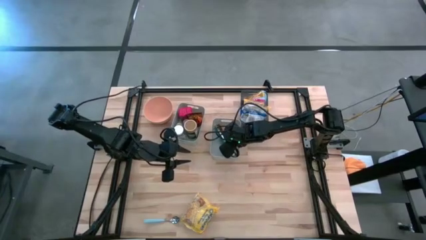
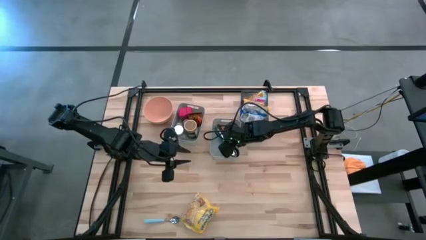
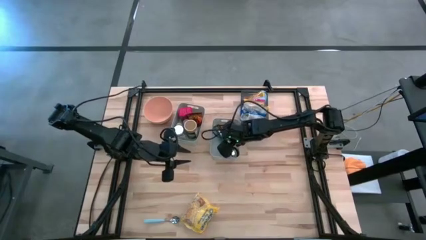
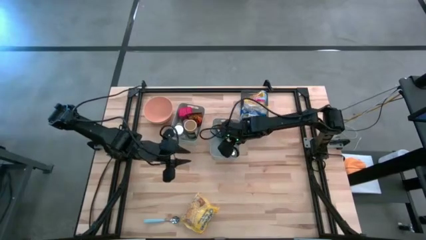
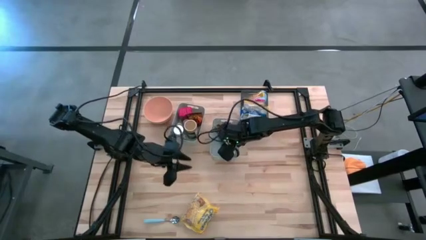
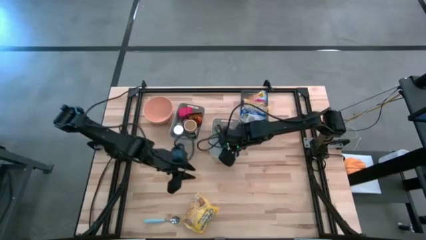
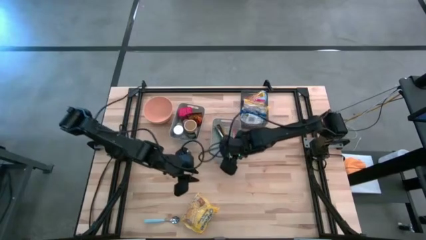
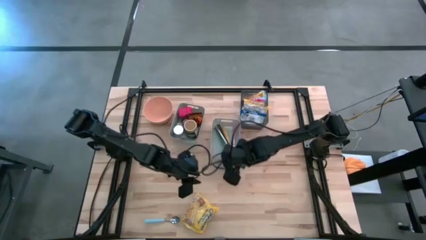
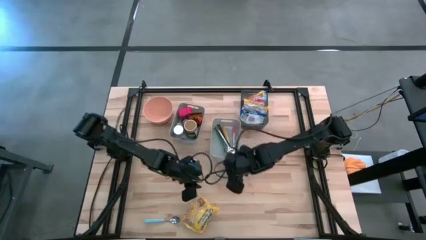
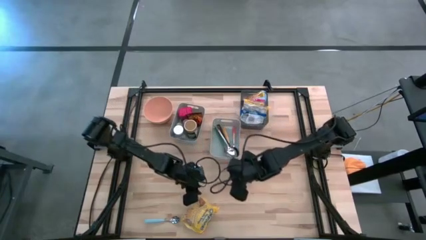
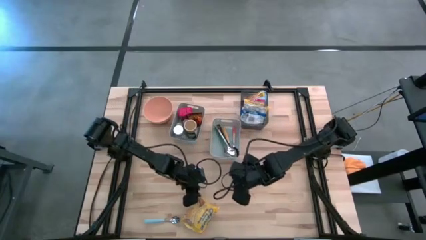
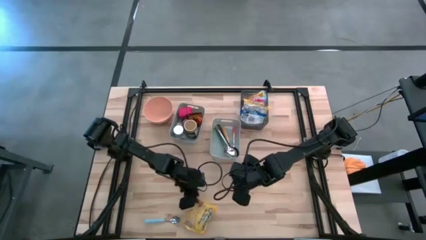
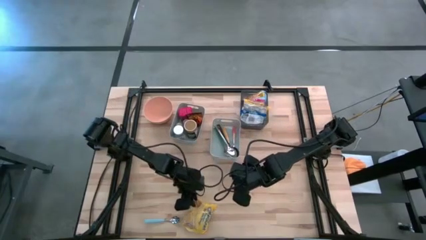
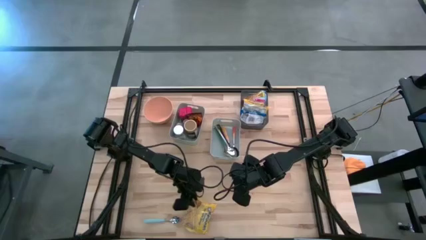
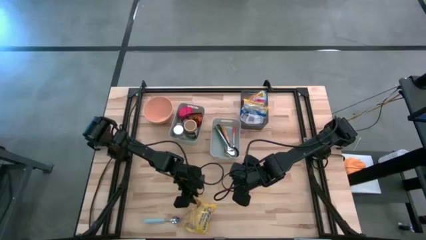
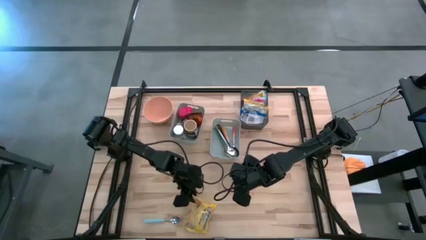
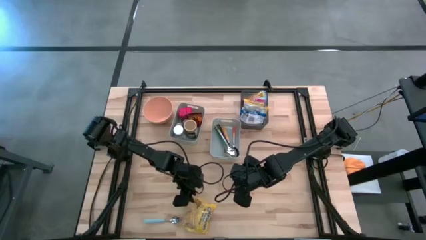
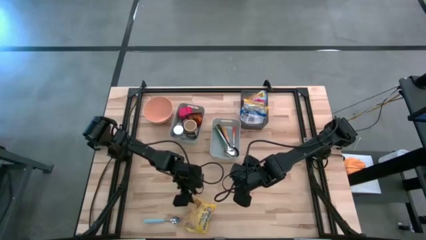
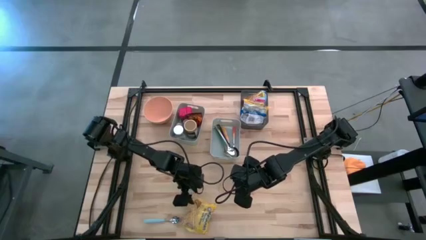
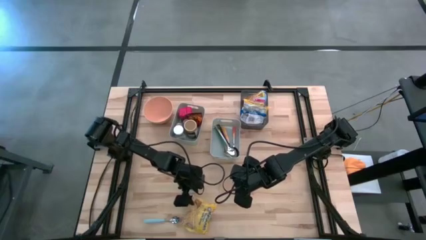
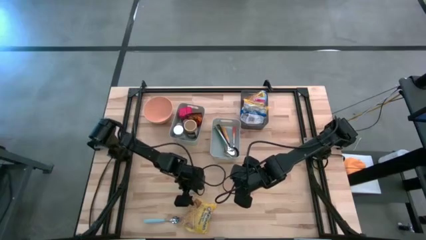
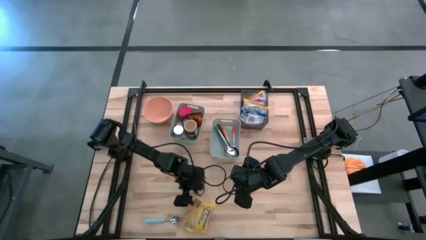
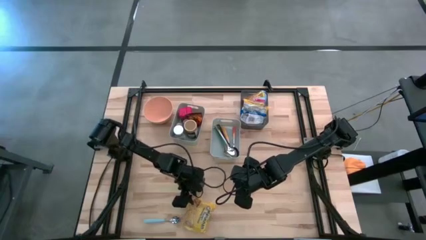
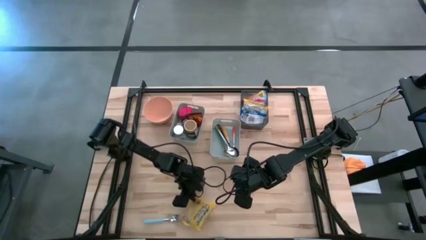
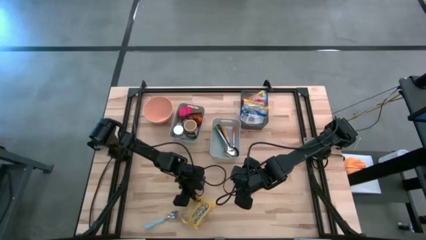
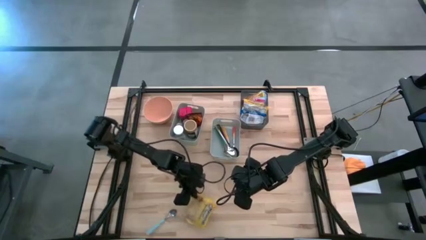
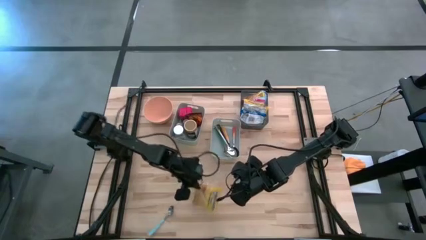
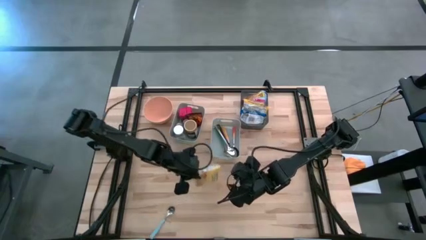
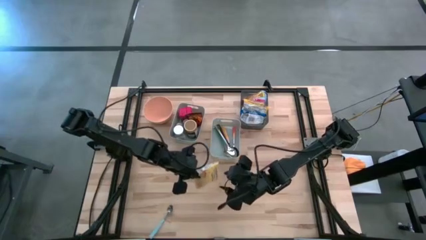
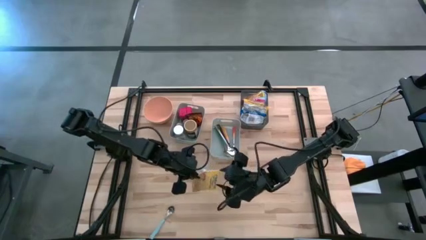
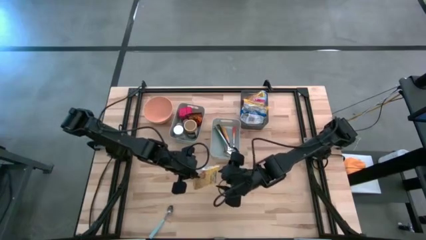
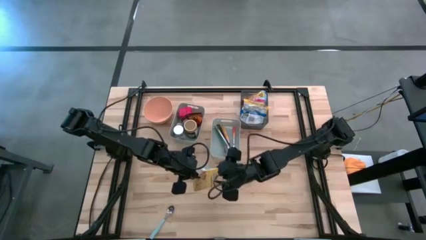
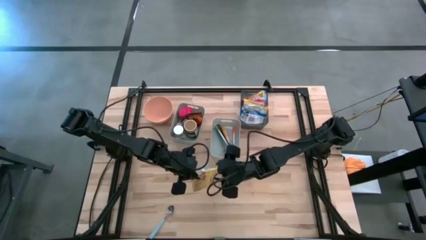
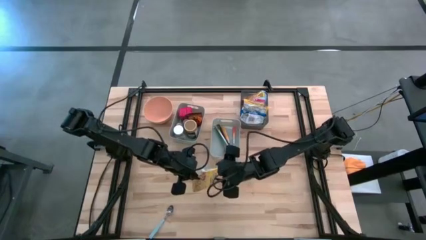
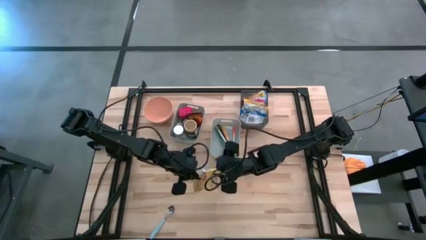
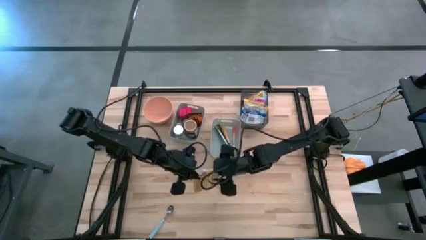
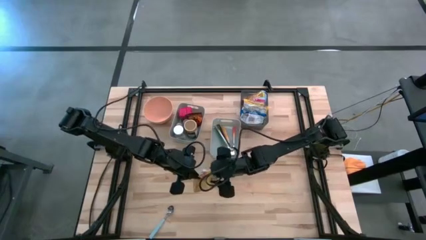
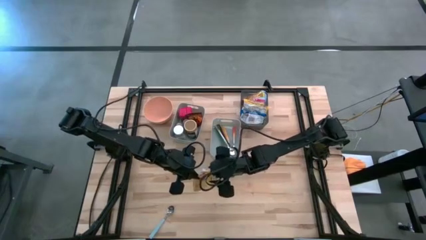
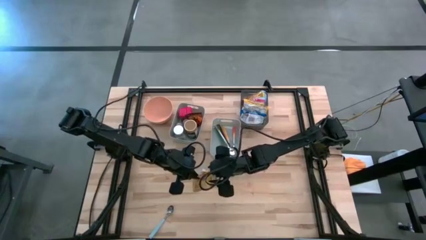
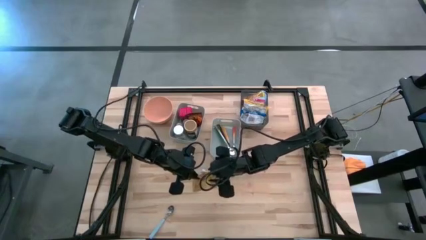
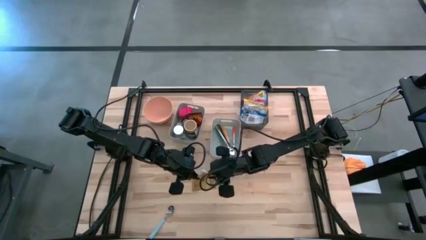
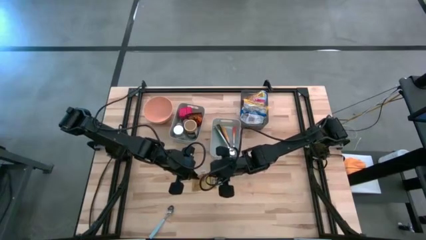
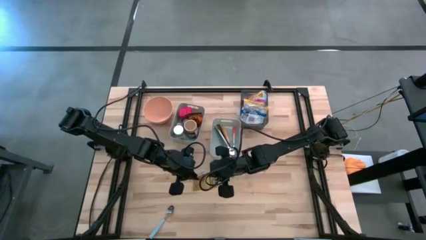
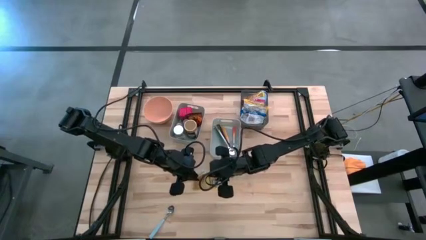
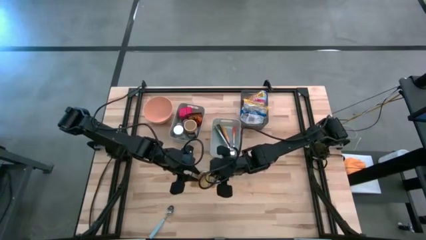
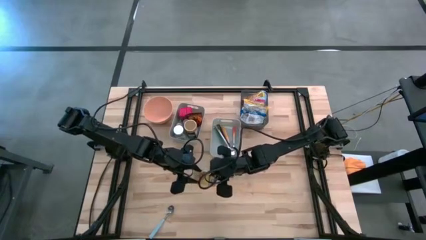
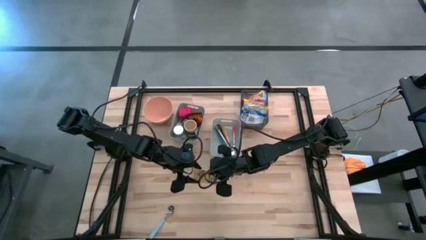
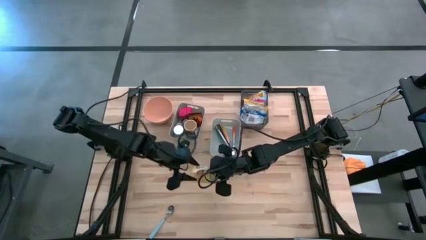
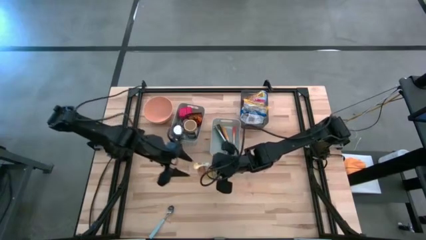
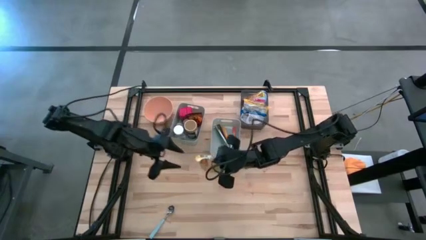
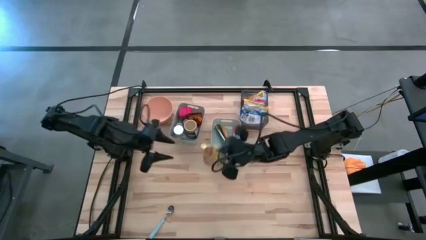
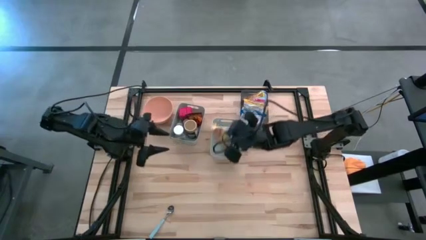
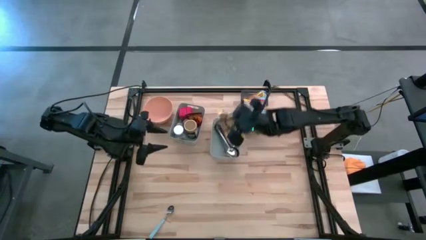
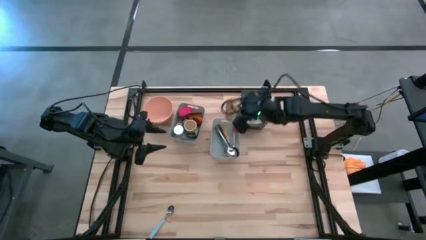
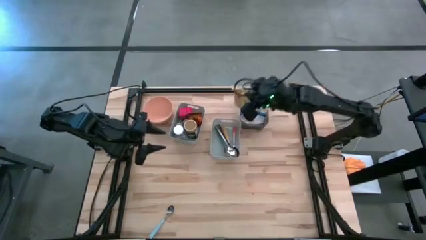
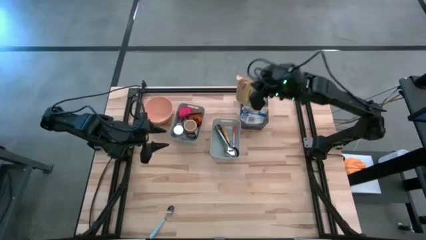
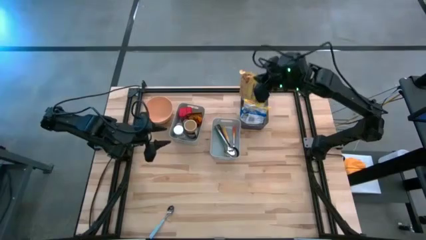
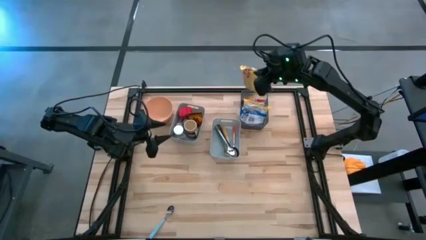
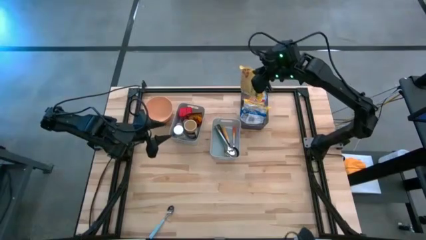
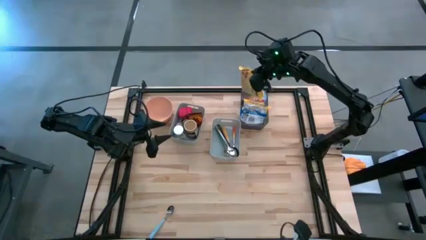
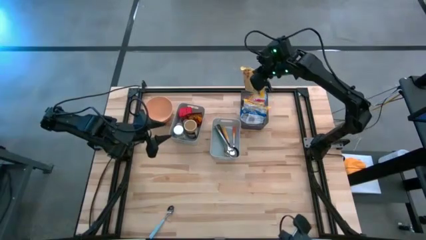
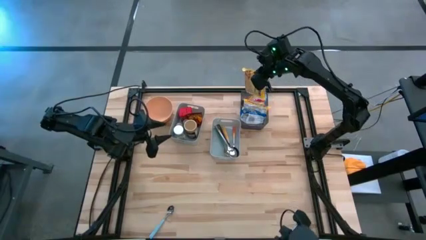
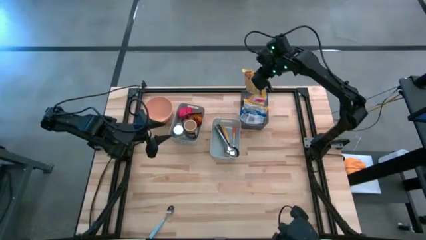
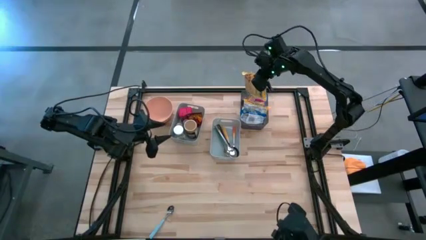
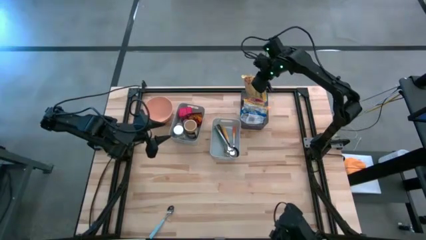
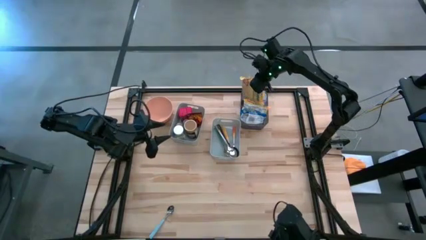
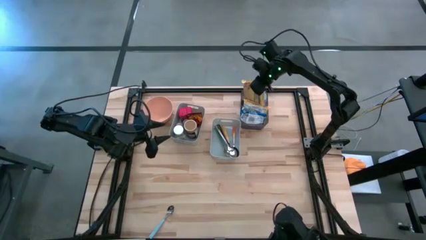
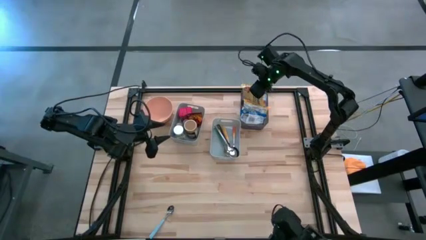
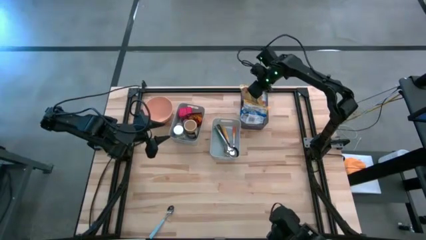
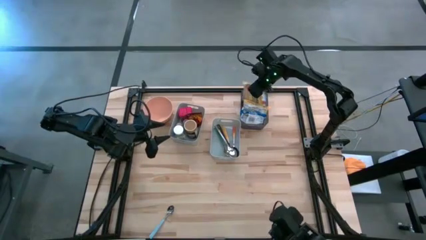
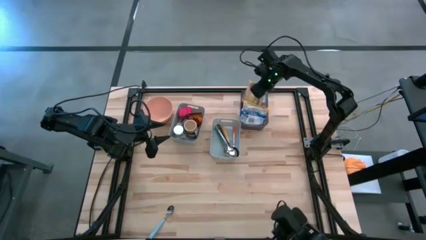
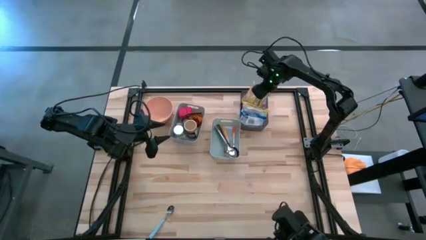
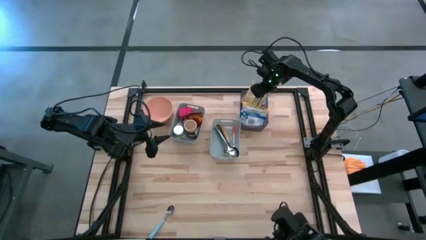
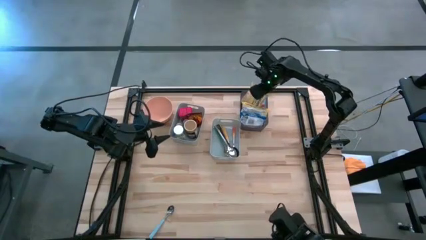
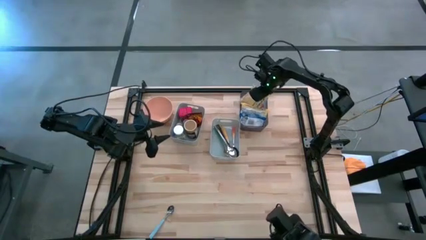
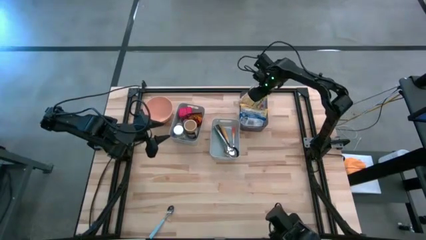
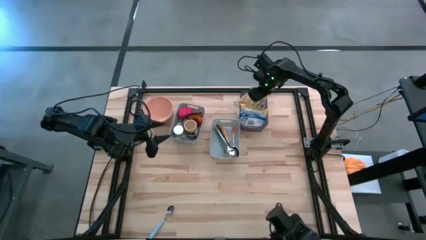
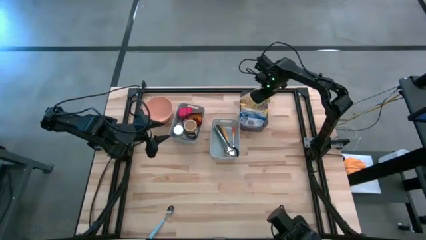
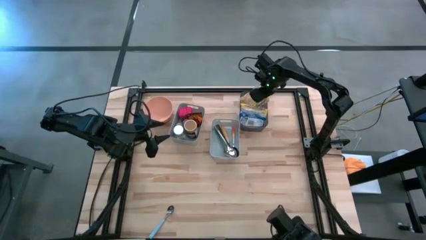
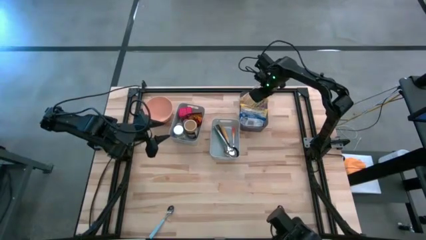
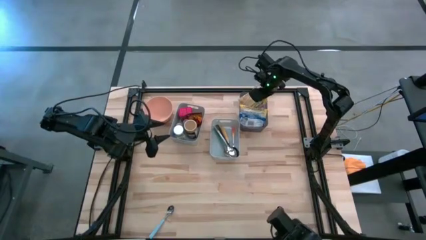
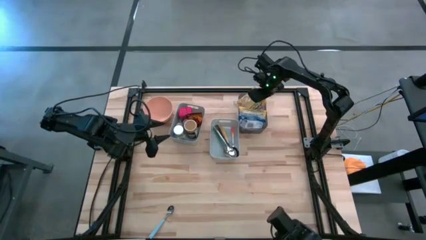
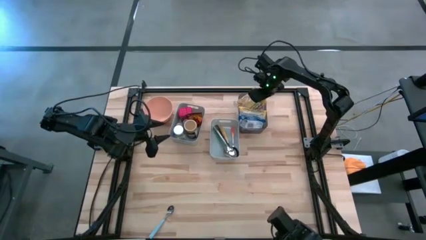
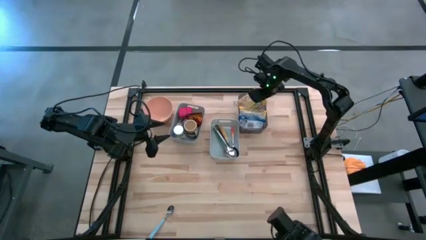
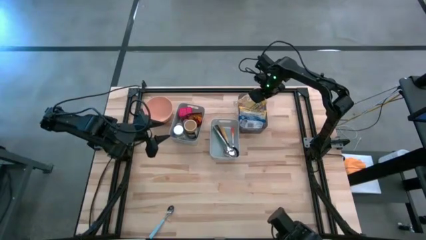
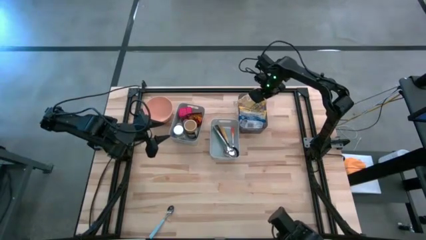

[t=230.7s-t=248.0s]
Put the yellow noodle pack into the black bin
